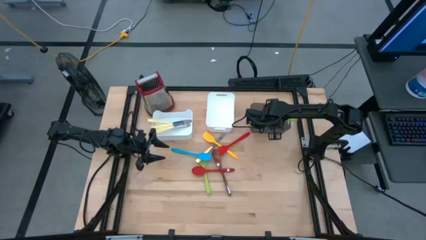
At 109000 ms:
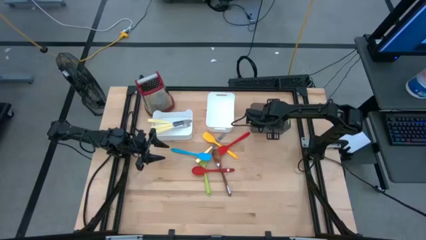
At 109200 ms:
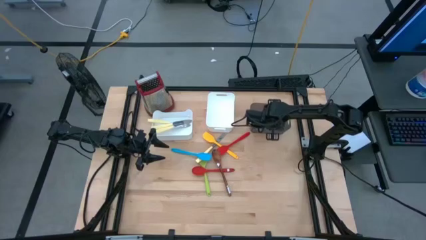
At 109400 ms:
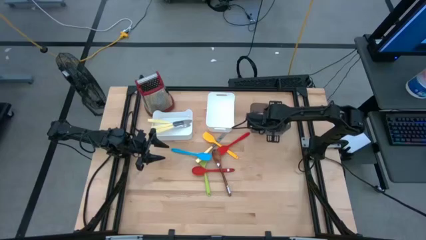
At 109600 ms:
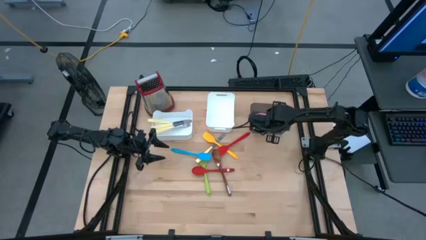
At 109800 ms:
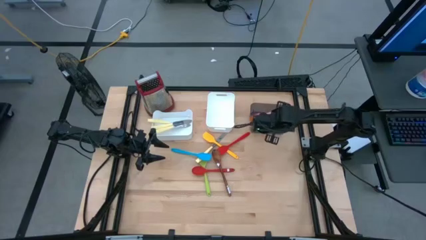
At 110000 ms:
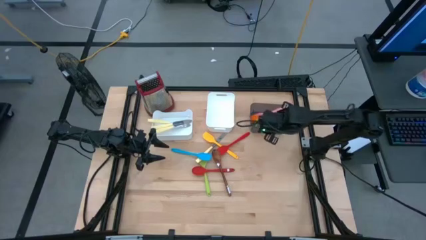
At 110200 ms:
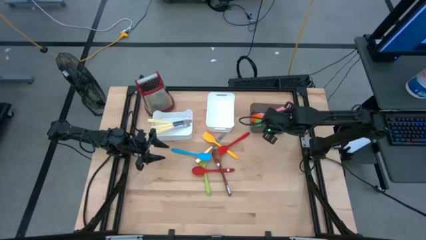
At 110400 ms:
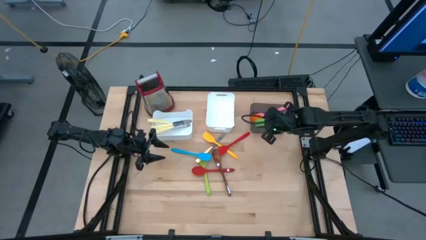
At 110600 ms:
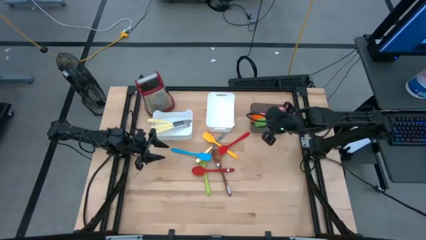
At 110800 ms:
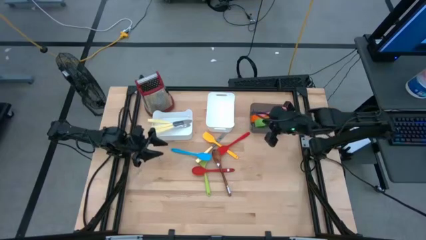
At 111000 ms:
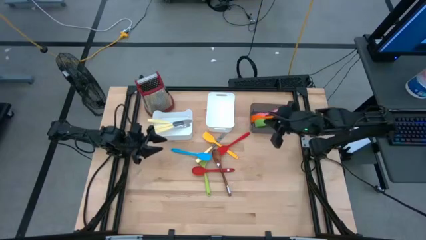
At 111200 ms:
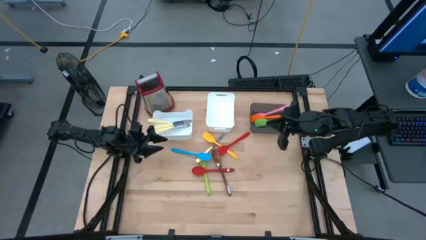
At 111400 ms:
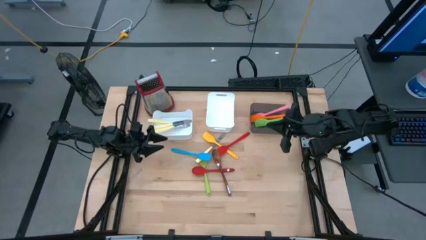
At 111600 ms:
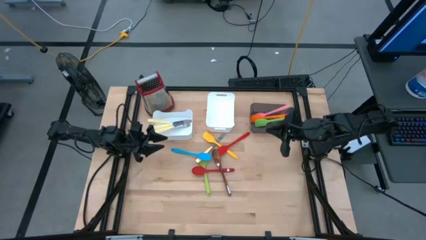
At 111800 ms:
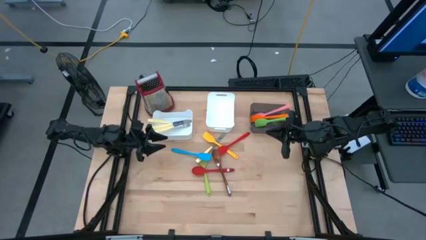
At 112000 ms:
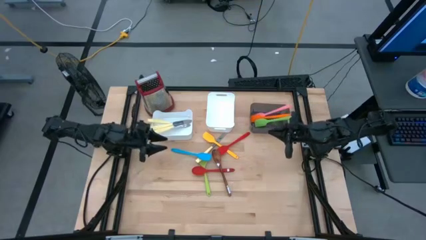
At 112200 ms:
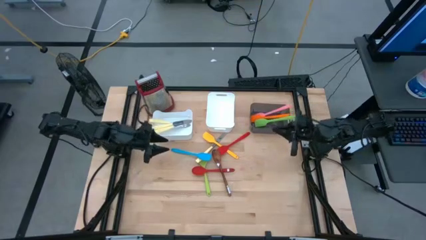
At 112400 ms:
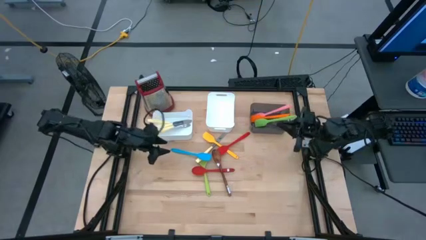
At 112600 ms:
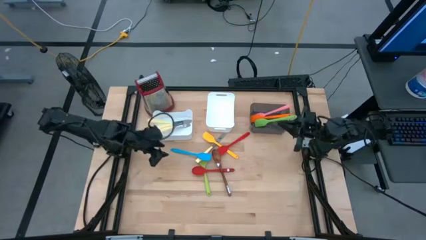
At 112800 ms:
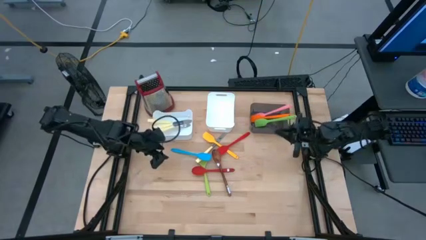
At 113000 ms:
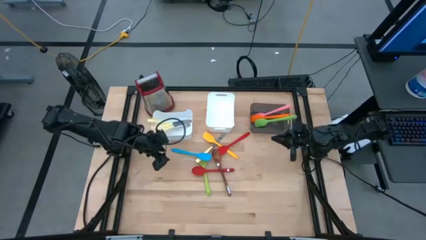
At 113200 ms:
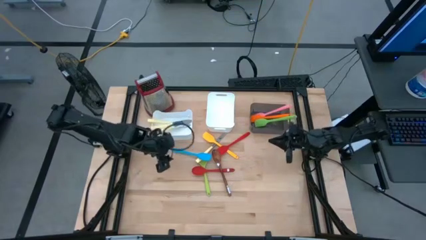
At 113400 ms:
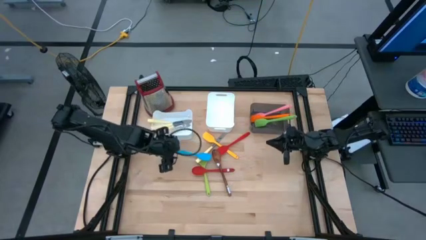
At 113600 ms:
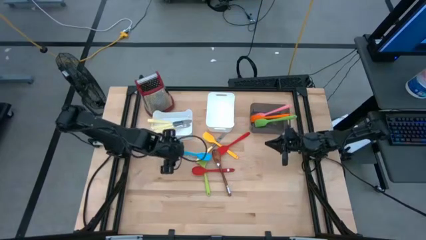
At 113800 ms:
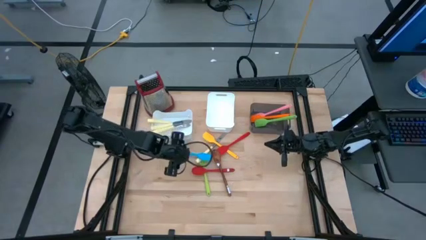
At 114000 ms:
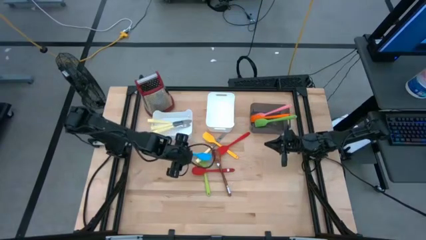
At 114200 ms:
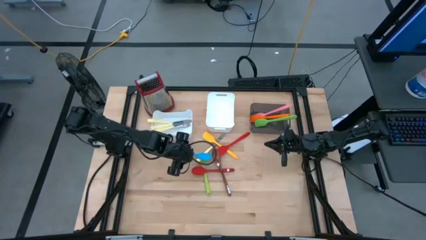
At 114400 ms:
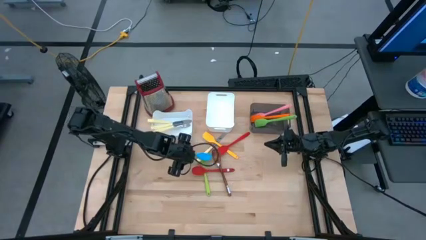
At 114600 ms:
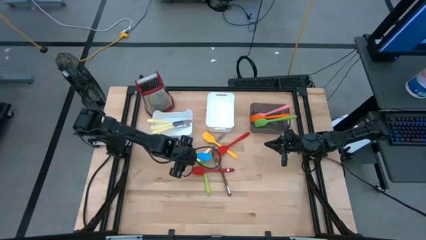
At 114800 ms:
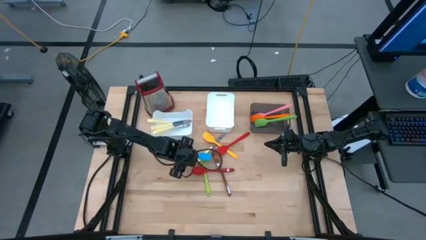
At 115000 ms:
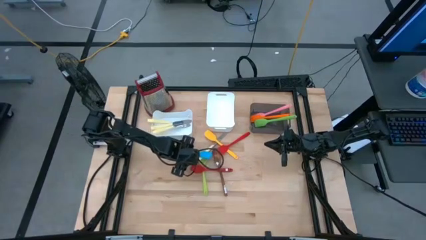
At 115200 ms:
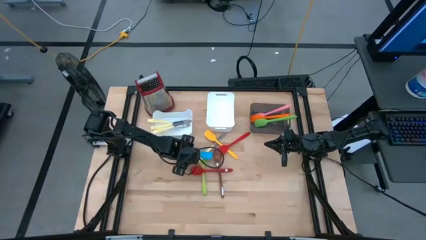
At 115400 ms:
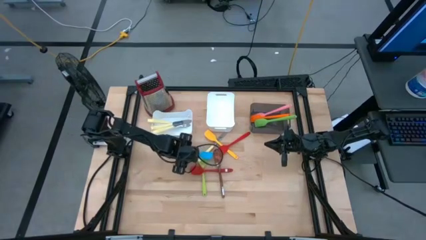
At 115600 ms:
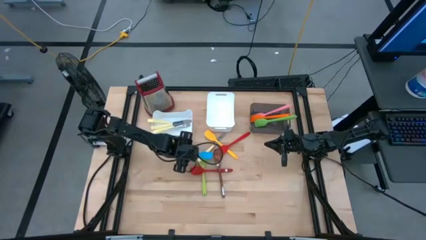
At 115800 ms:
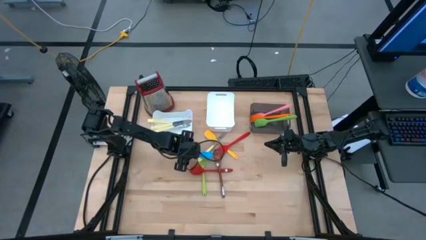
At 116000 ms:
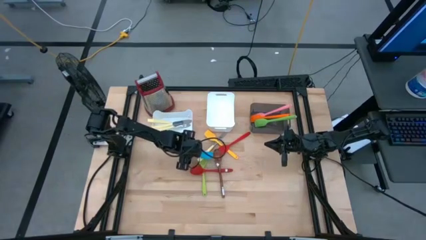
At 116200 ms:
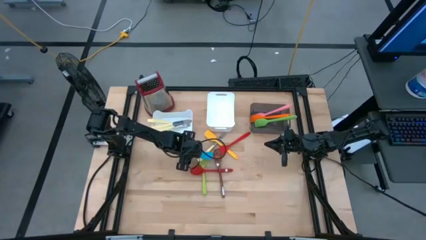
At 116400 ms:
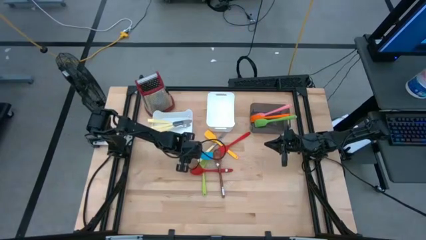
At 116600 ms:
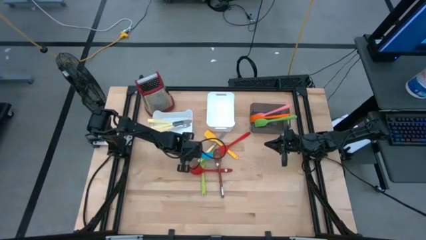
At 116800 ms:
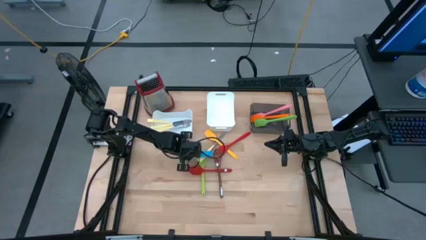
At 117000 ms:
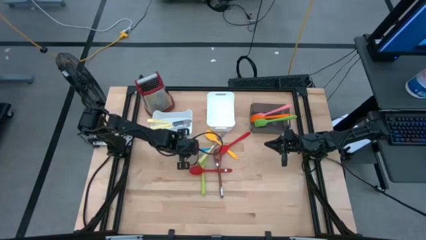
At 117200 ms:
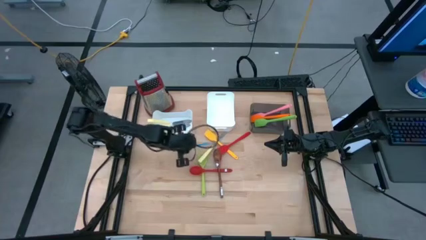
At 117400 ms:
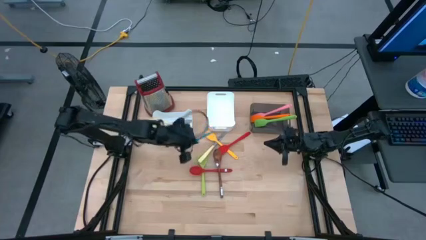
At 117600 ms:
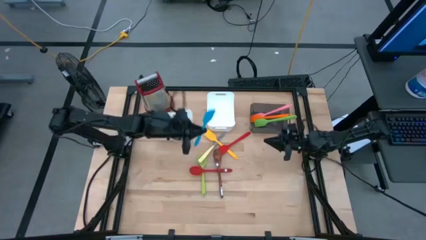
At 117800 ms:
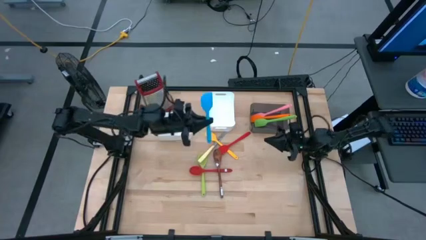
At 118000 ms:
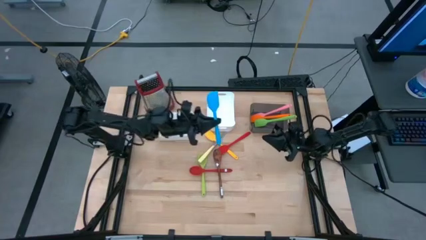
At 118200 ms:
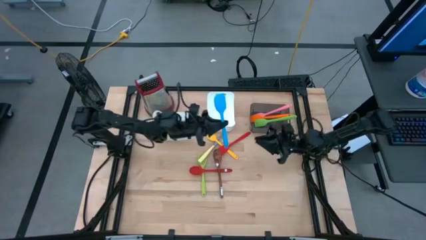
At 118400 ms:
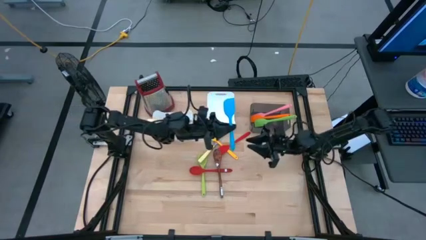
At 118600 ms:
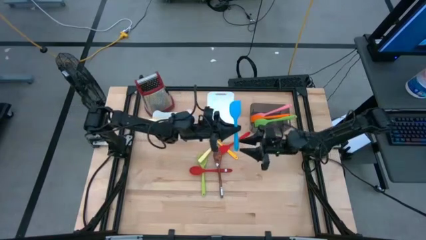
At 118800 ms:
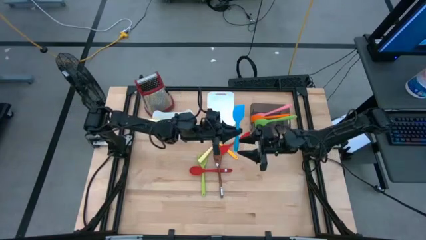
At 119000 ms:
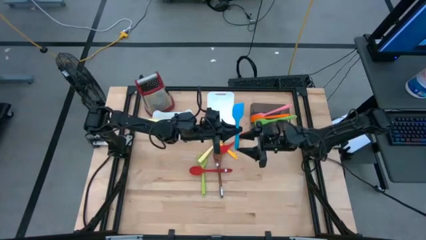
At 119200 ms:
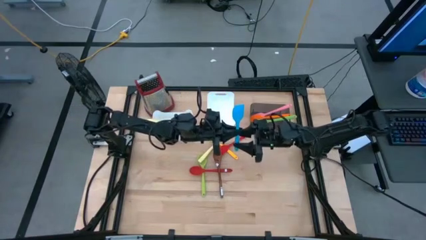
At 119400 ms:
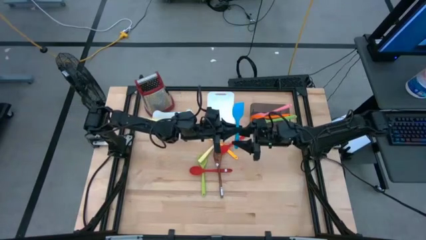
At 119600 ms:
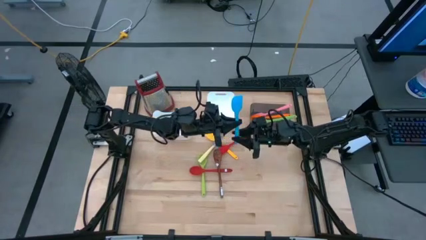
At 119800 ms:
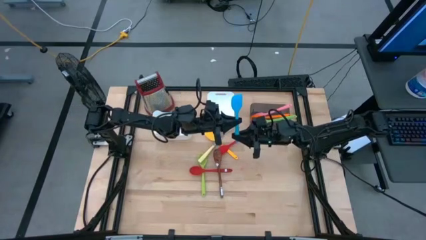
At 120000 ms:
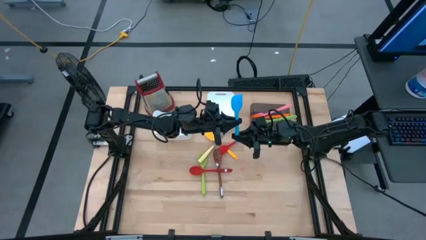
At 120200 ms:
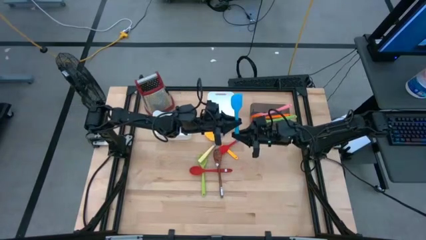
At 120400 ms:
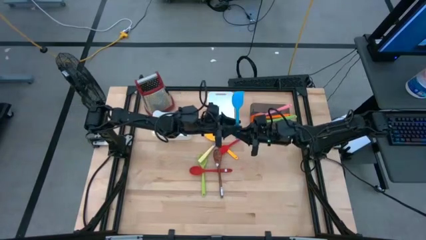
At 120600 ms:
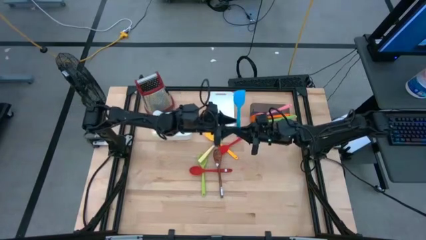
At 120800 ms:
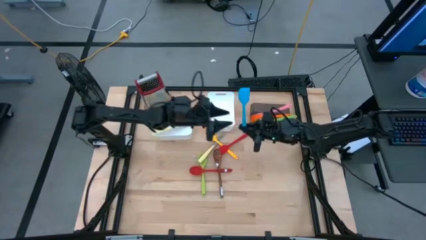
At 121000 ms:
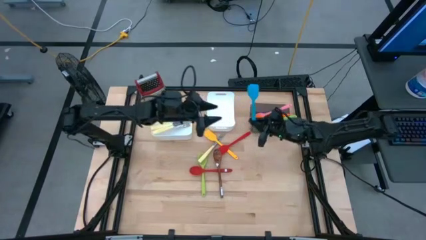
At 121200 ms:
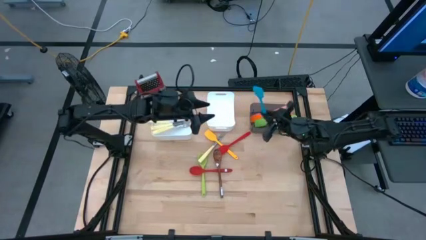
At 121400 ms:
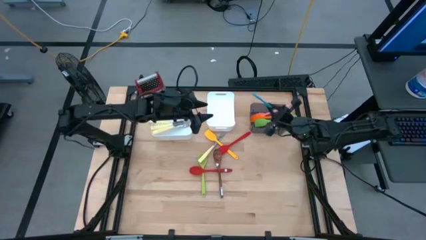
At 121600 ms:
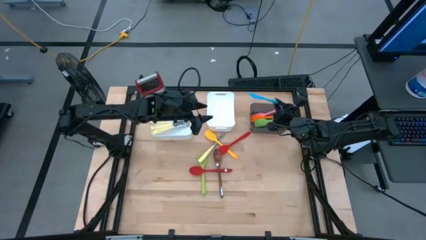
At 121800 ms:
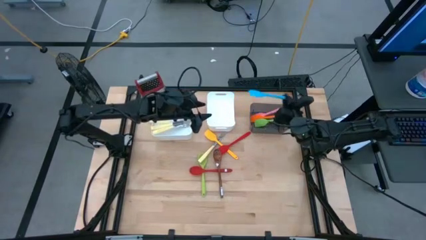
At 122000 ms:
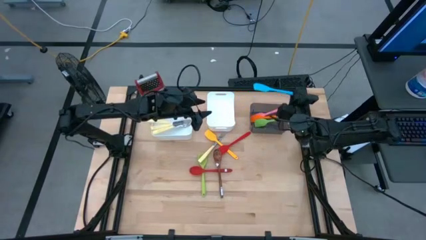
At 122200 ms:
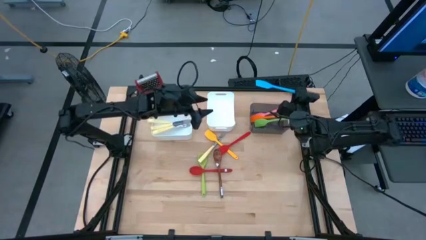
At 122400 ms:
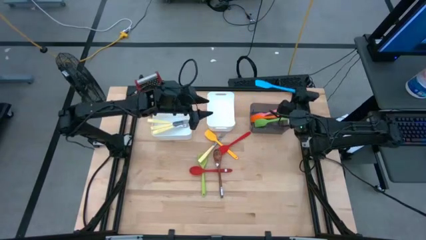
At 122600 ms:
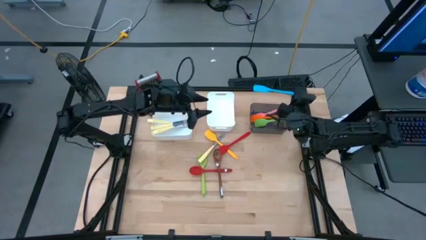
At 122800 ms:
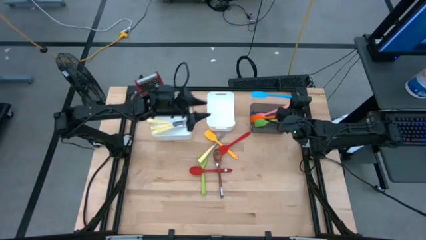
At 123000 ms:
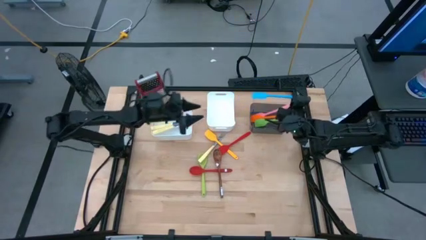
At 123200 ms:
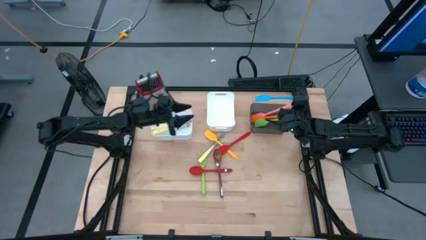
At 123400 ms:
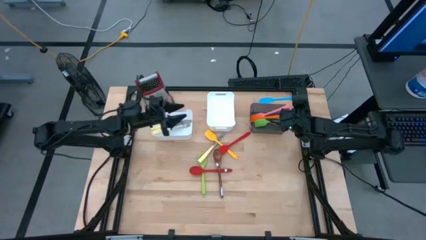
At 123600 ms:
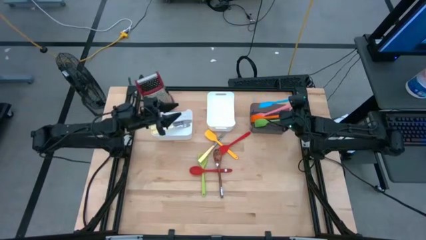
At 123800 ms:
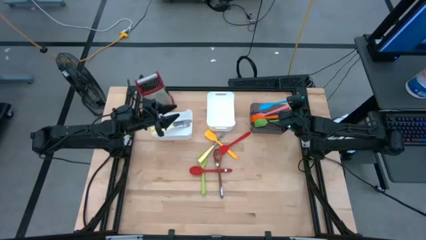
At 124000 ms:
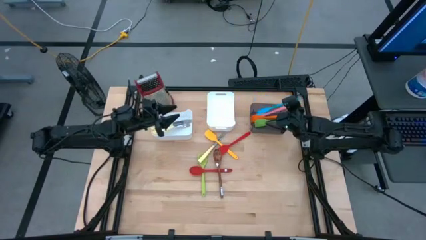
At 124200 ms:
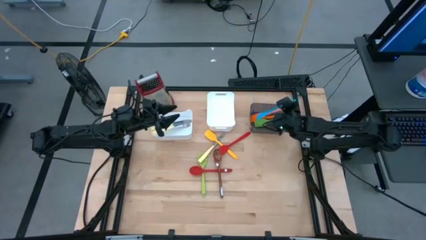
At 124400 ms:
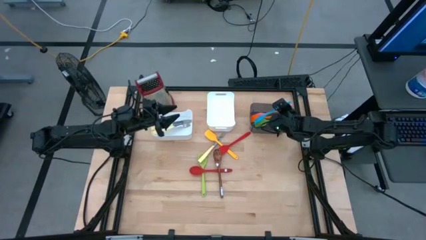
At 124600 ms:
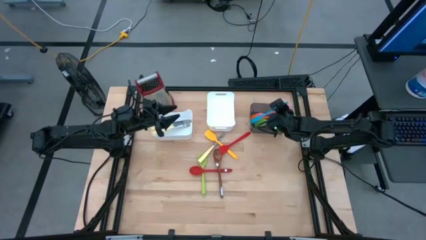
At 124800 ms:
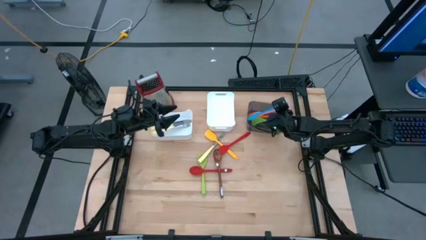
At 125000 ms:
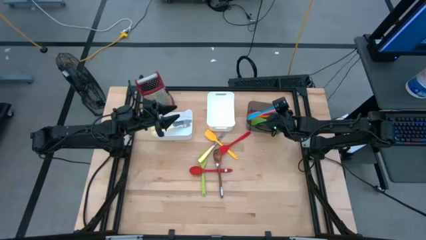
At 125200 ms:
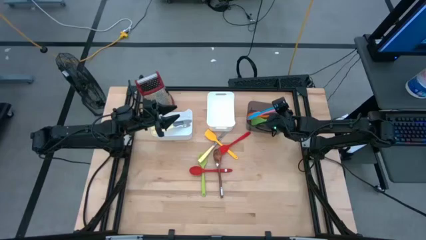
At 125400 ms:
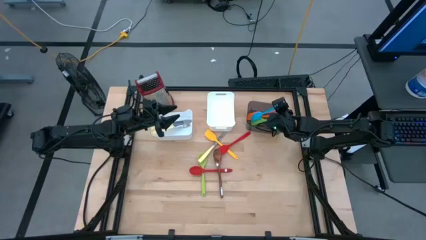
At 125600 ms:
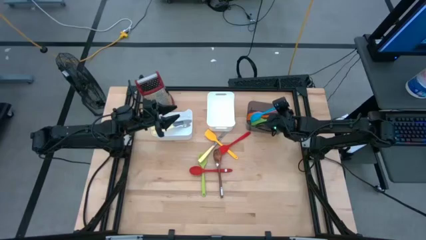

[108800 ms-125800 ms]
Task: Pick & Place Kitchen Items
Put the blue spatula into the black bin
